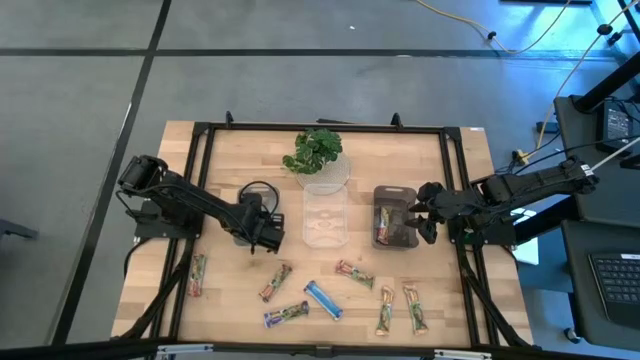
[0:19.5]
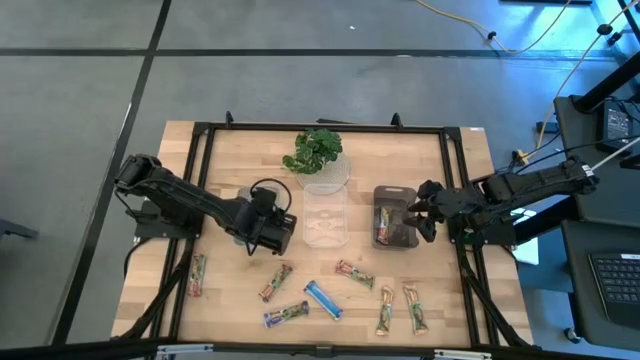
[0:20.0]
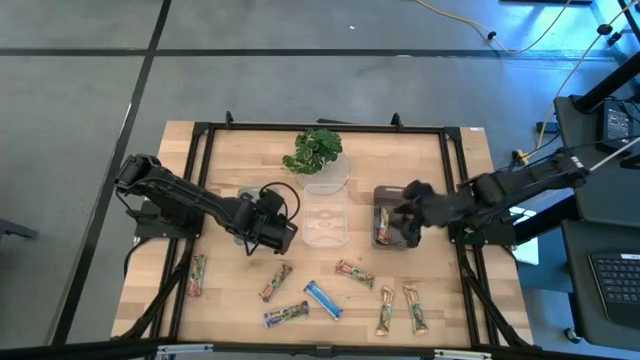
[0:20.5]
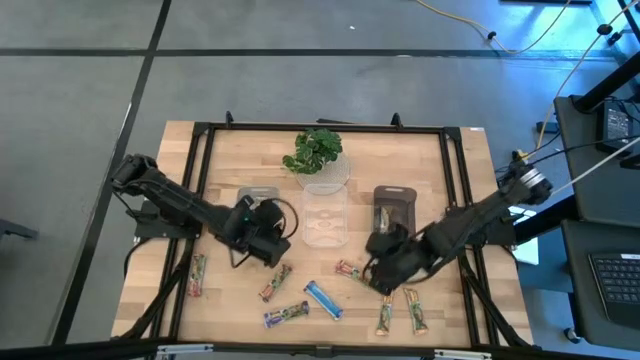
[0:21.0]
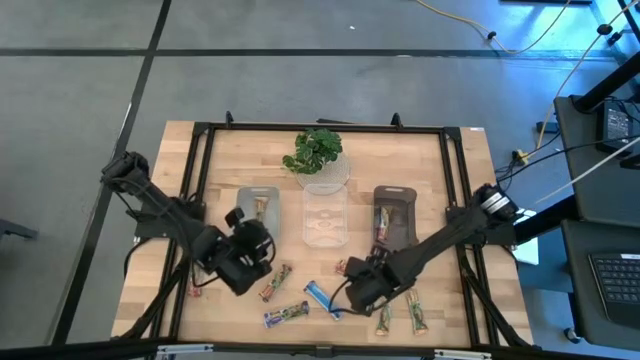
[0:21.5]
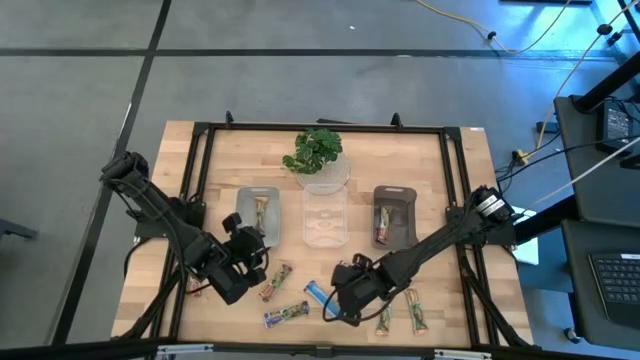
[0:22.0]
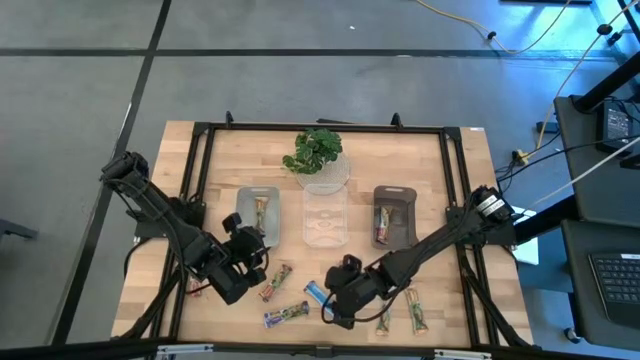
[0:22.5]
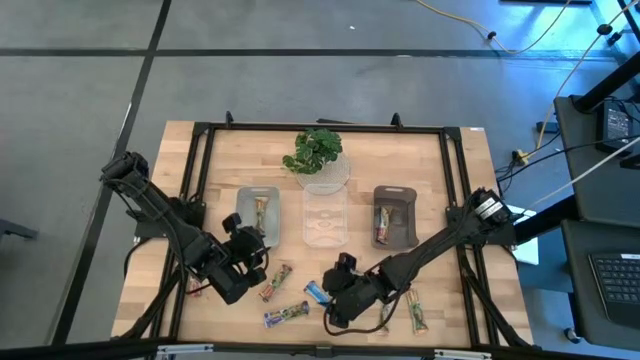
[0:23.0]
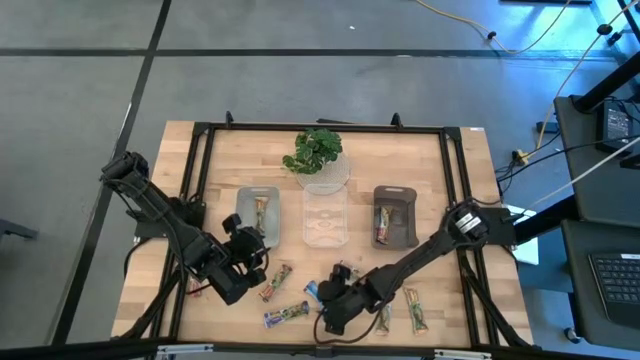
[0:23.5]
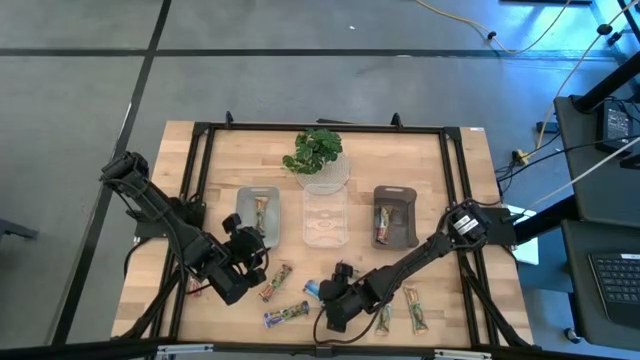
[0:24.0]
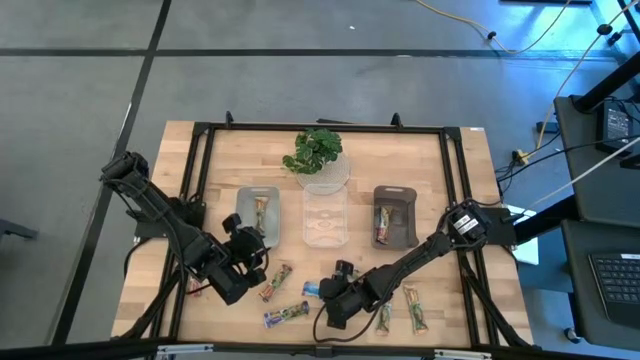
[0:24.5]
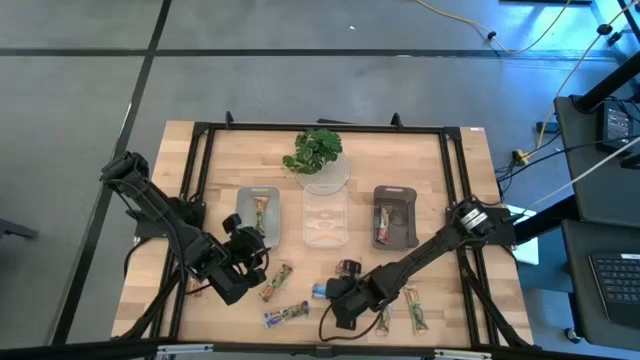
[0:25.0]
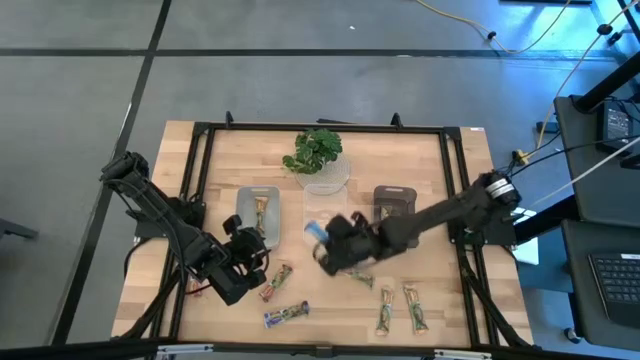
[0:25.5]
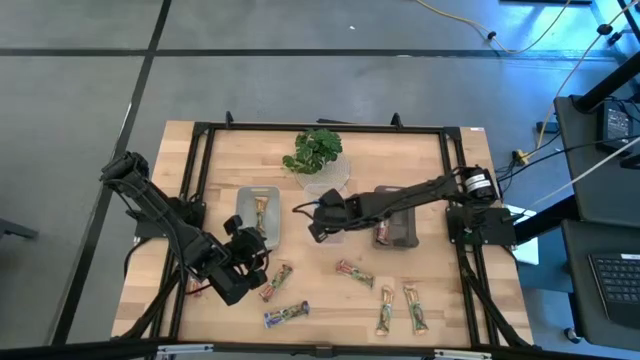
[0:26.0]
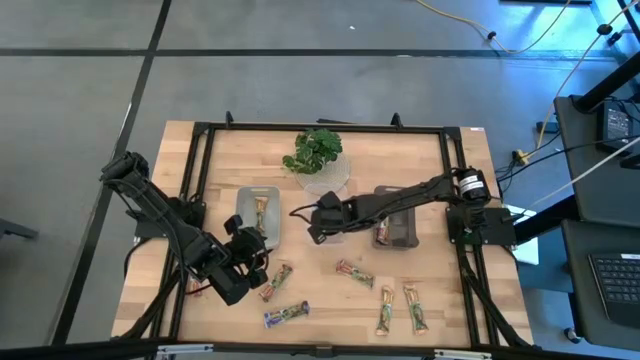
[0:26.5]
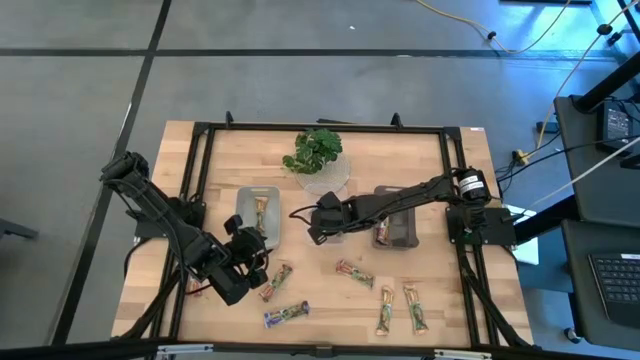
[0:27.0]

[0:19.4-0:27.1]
Task: Pick and place Granola Bars by type
Put the right blue granola bar into the transparent bin

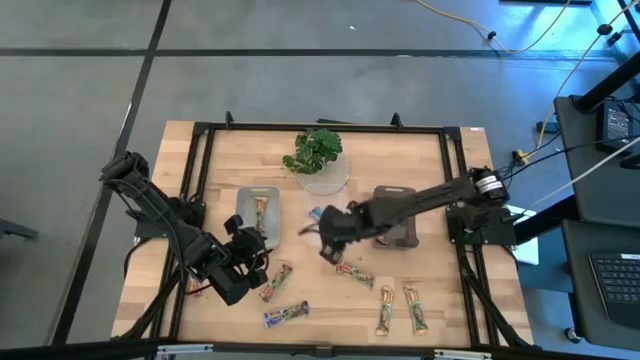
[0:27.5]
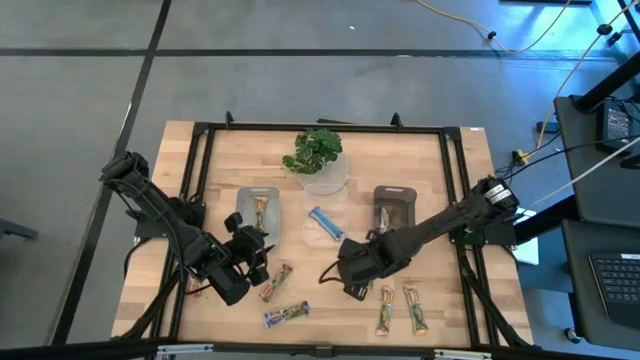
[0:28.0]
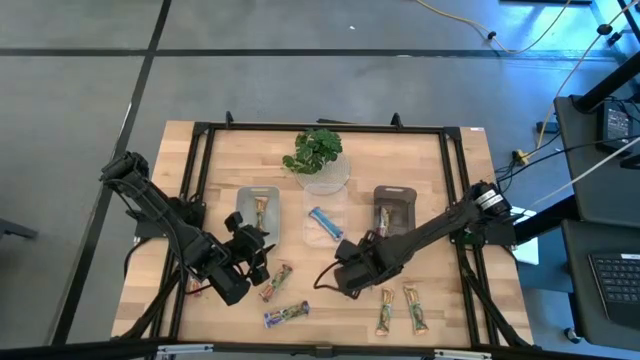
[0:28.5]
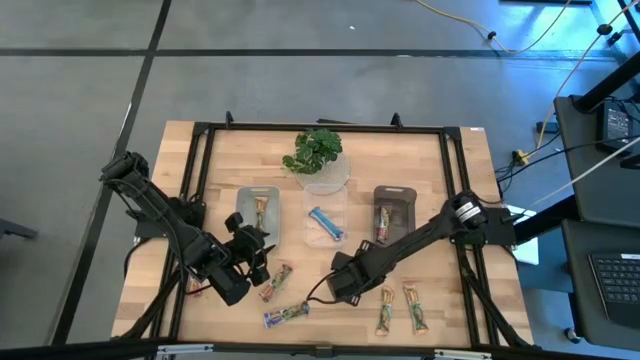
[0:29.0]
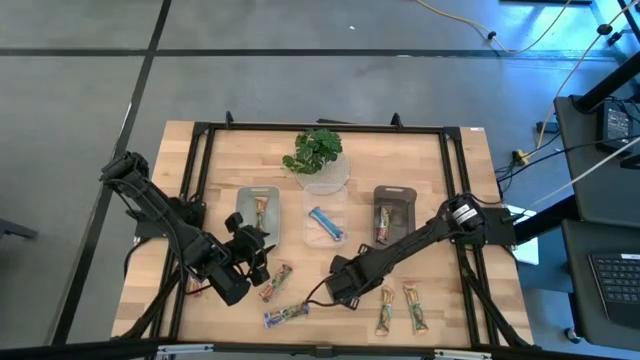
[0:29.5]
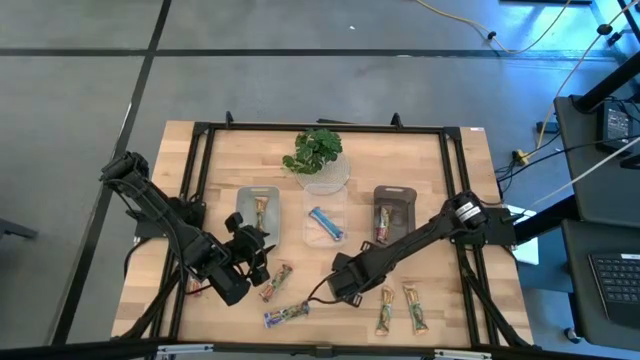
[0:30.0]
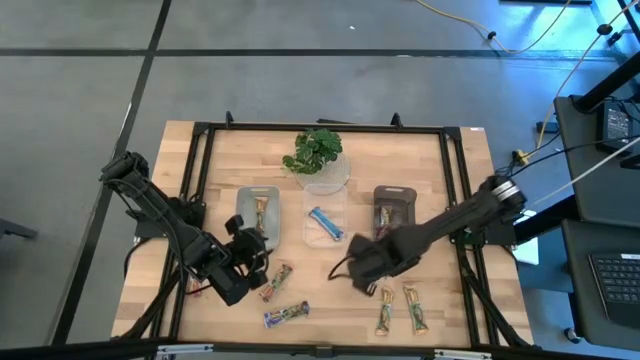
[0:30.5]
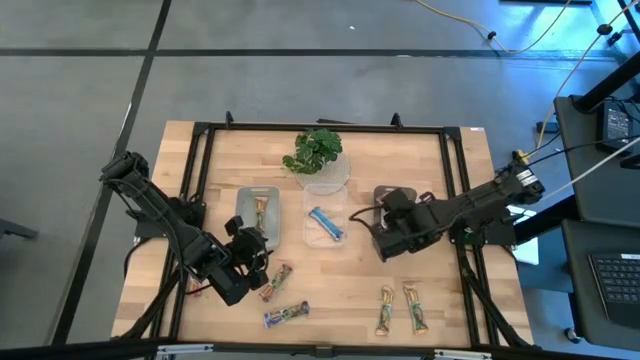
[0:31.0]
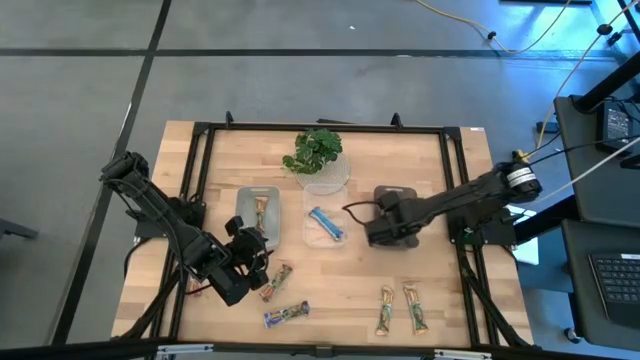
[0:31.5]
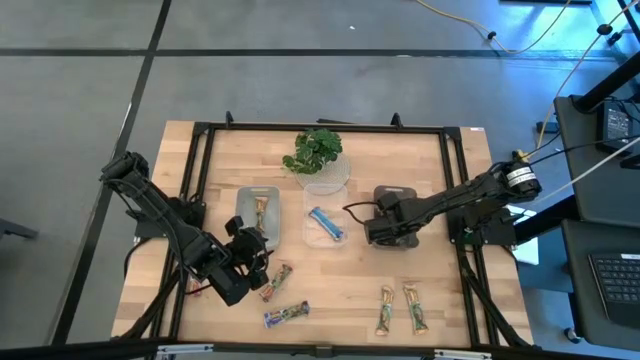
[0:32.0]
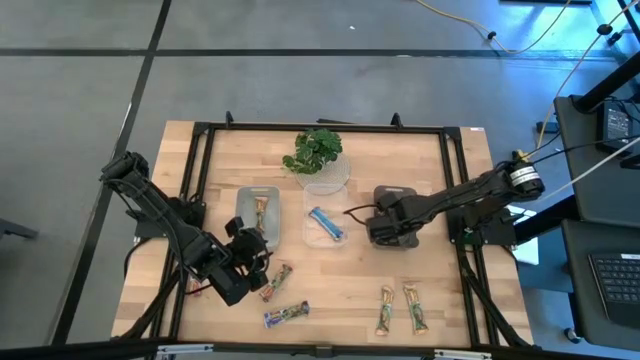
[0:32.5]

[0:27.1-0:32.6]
Put the right red granola bar into the black transparent bin

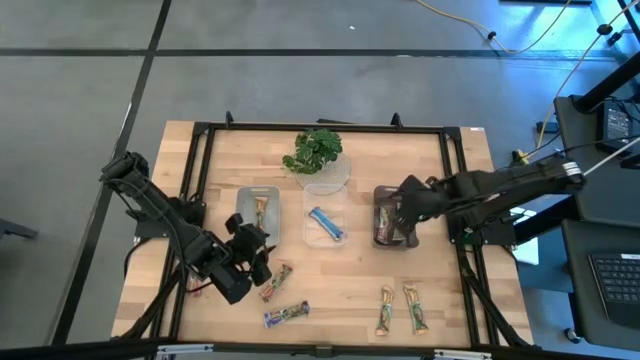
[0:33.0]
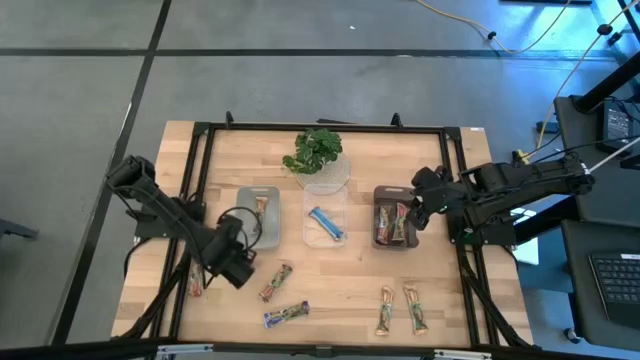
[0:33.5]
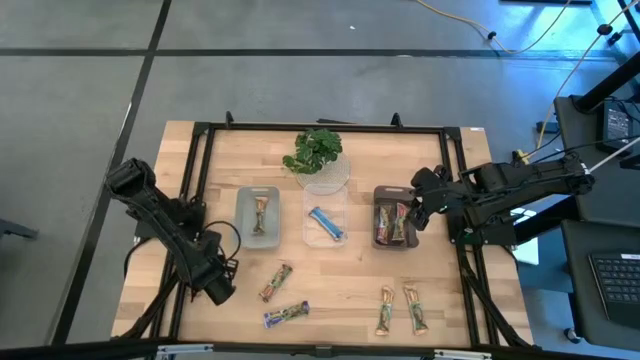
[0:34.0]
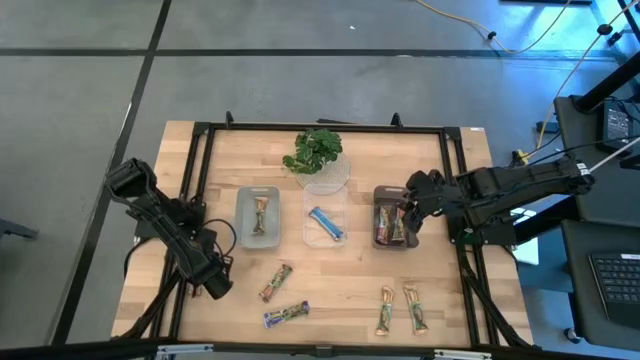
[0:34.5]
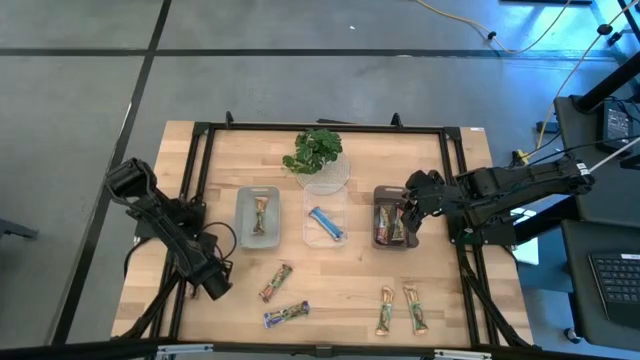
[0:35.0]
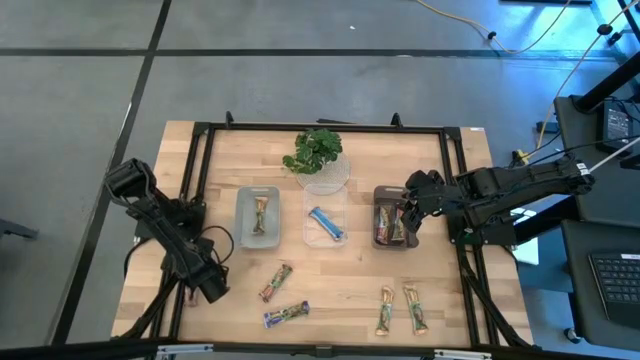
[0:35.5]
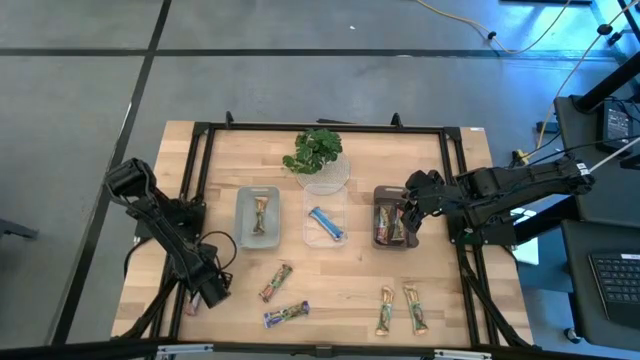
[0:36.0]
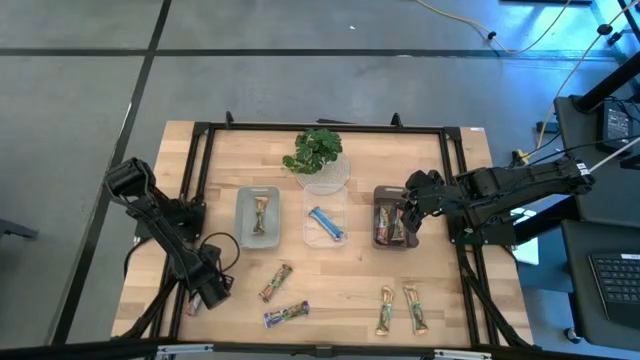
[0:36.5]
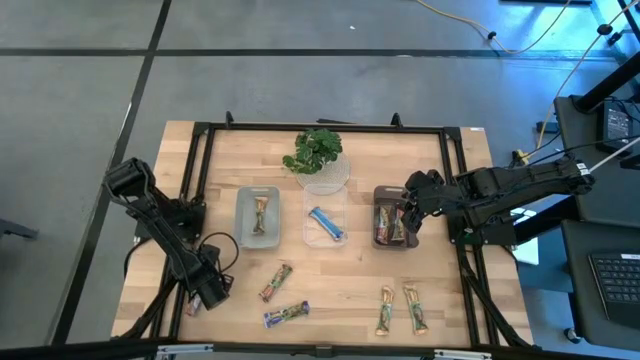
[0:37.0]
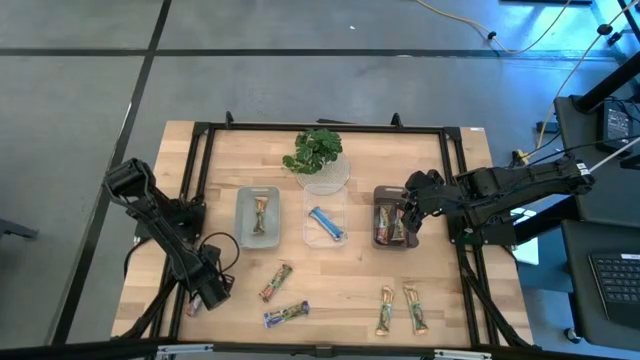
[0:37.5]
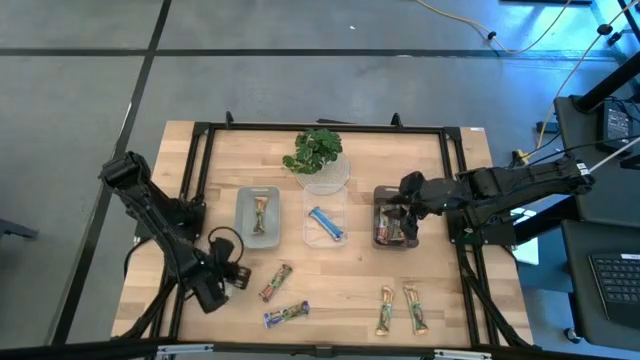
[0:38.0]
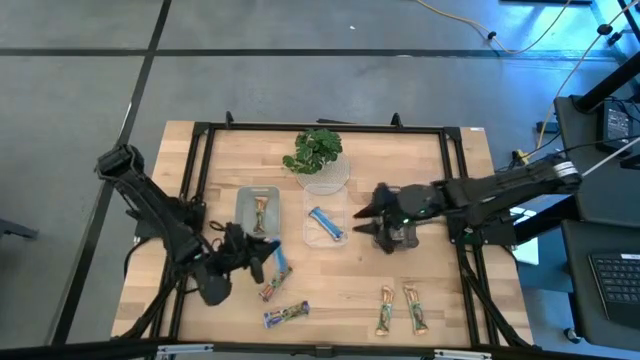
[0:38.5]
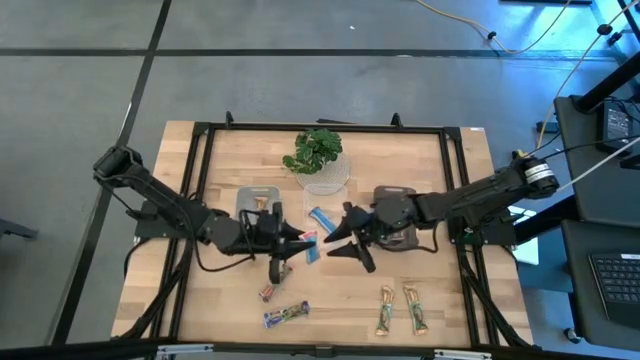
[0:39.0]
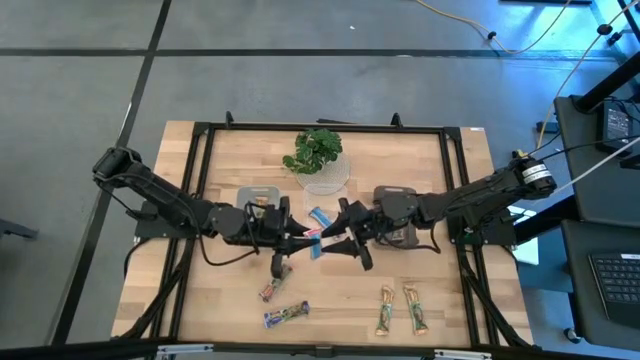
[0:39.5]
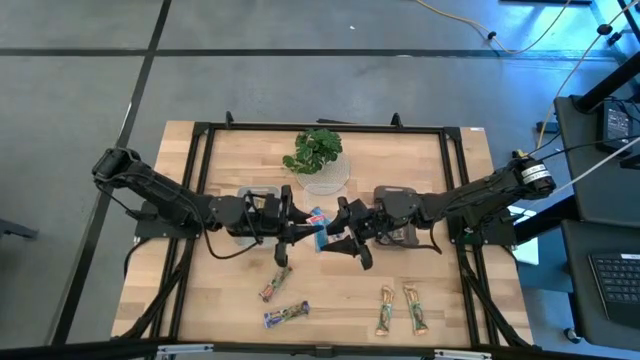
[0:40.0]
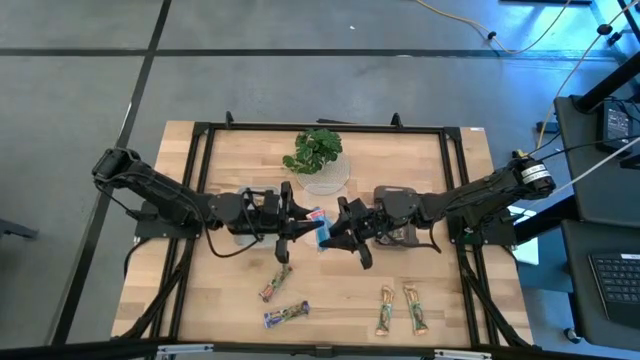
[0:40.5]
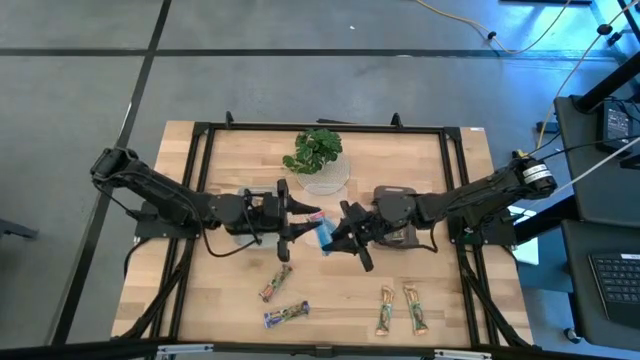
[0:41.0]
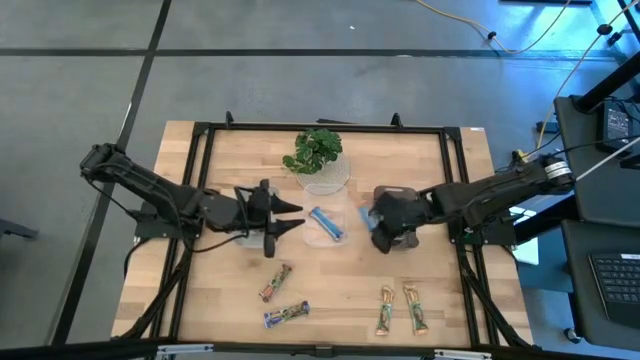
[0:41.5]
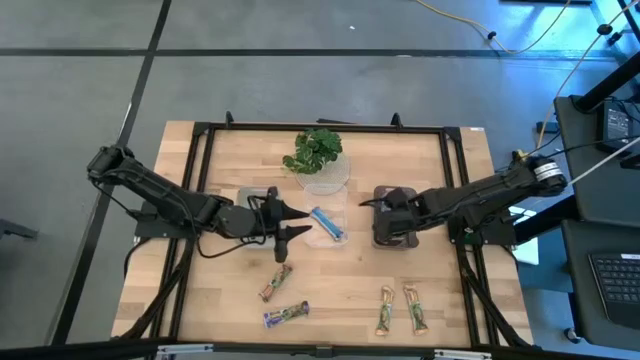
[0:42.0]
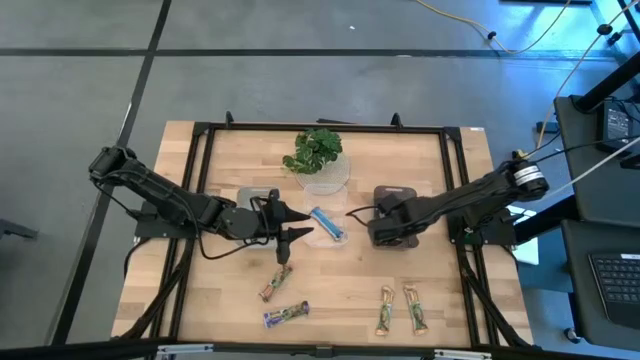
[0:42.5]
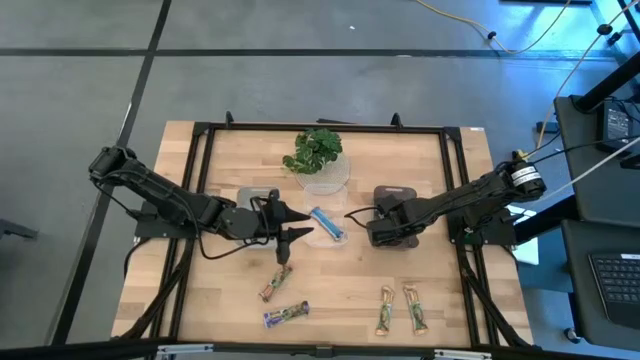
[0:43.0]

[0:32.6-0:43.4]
Put the left red granola bar into the black transparent bin
